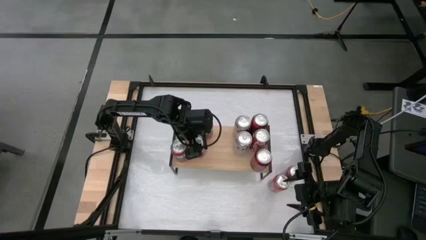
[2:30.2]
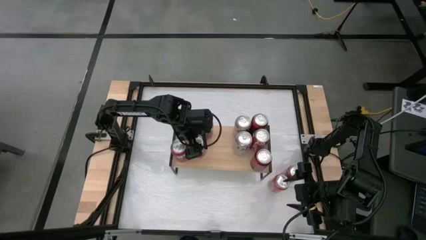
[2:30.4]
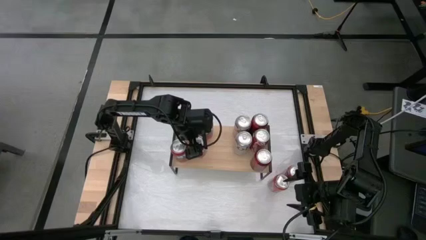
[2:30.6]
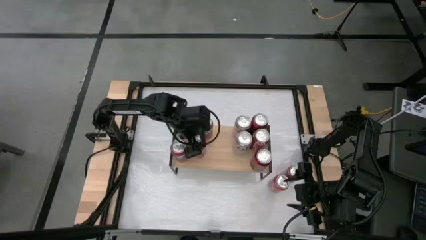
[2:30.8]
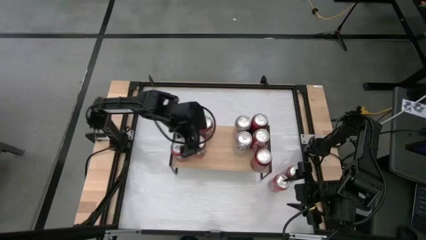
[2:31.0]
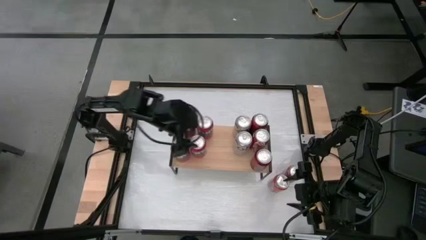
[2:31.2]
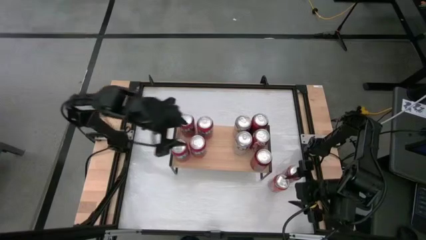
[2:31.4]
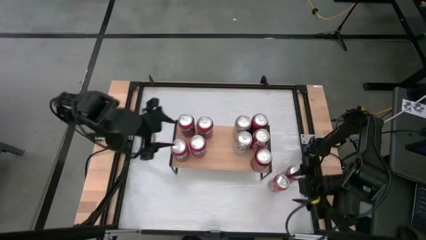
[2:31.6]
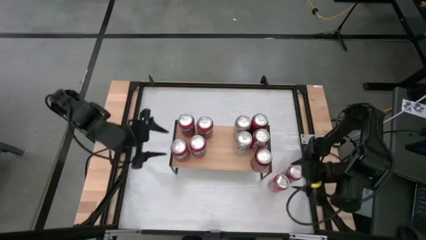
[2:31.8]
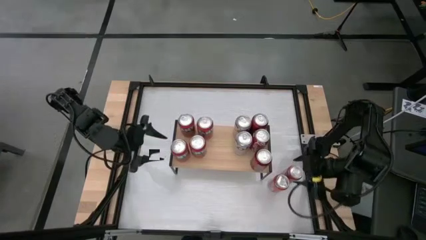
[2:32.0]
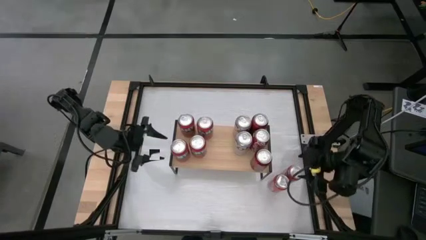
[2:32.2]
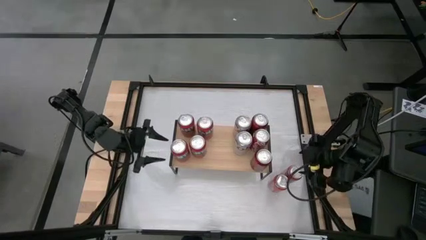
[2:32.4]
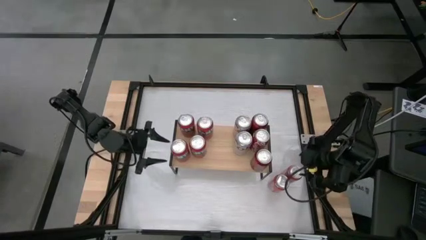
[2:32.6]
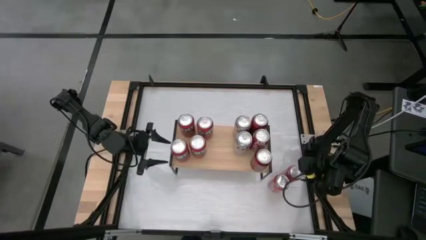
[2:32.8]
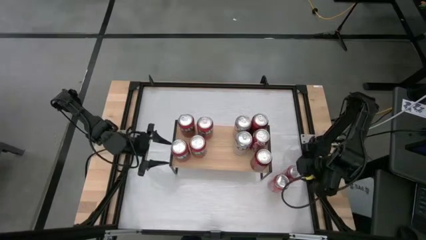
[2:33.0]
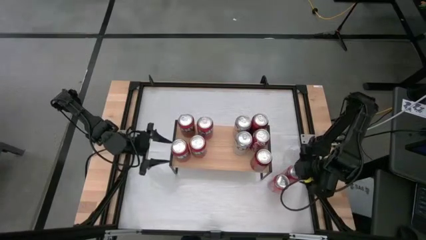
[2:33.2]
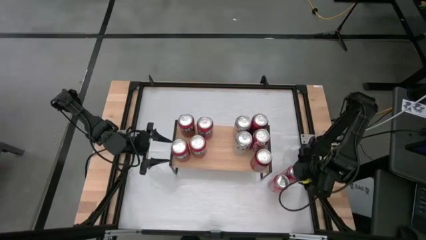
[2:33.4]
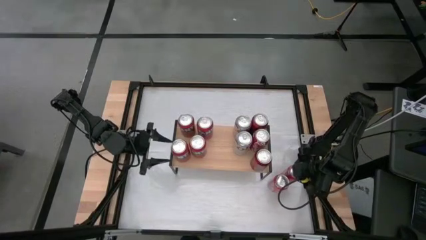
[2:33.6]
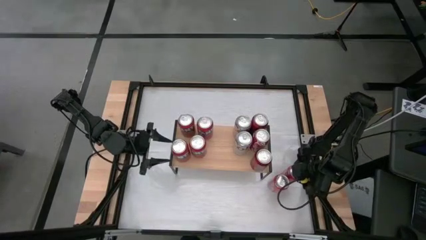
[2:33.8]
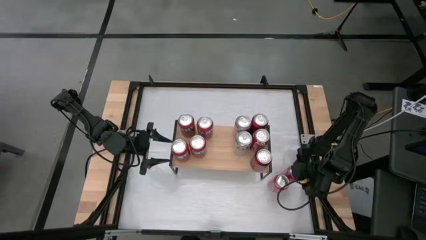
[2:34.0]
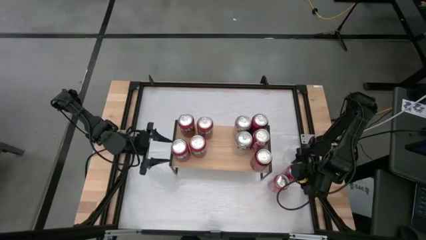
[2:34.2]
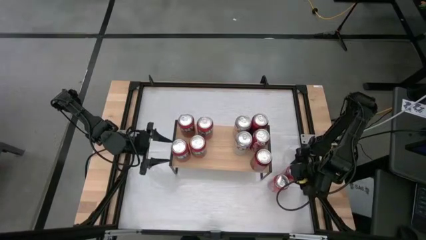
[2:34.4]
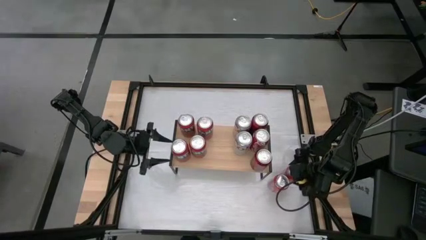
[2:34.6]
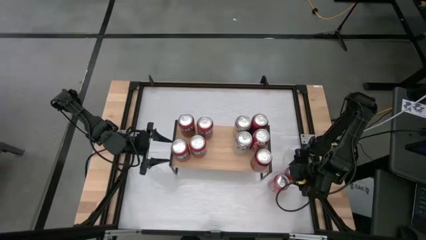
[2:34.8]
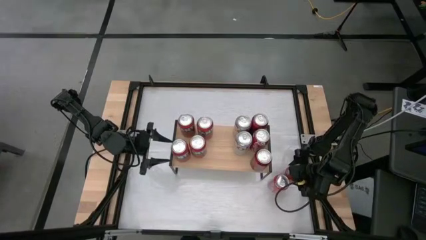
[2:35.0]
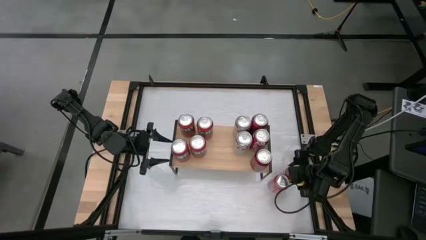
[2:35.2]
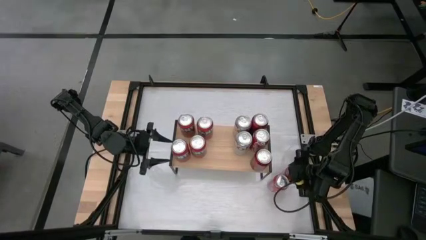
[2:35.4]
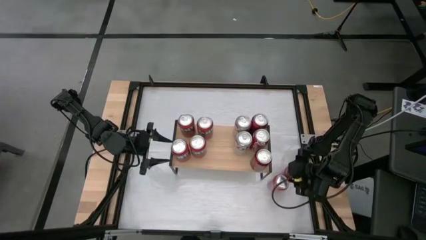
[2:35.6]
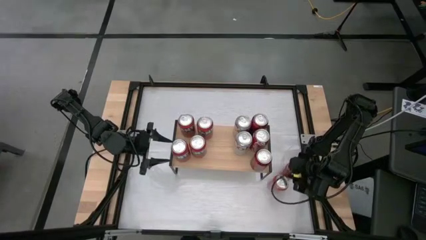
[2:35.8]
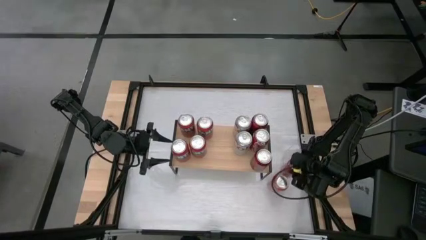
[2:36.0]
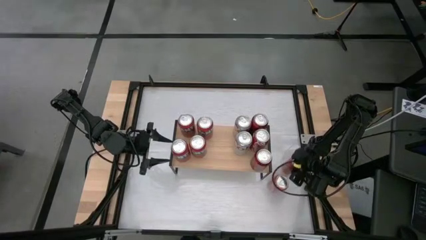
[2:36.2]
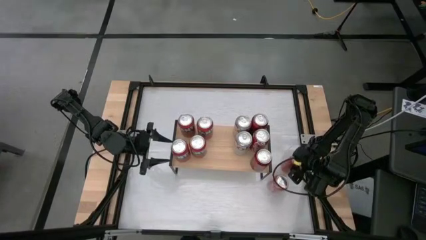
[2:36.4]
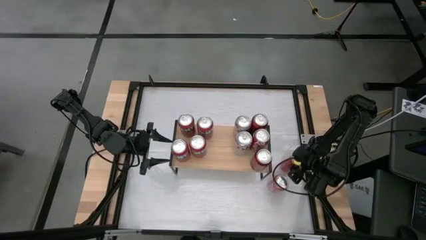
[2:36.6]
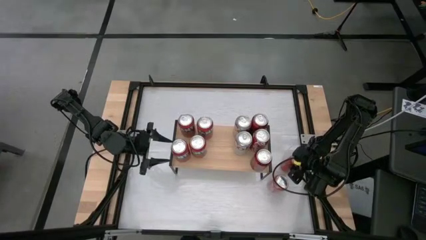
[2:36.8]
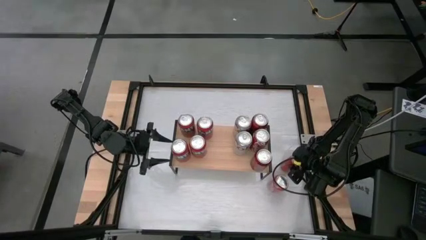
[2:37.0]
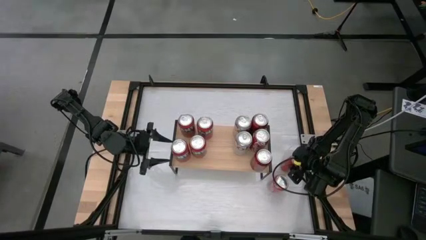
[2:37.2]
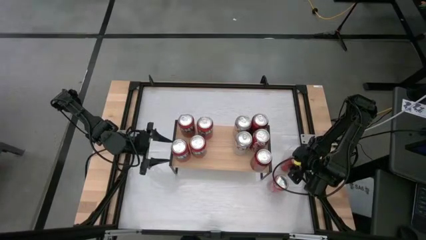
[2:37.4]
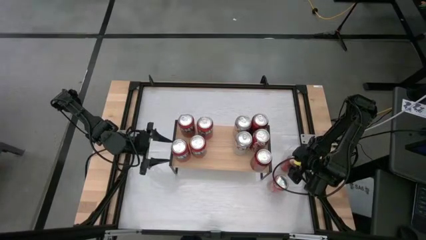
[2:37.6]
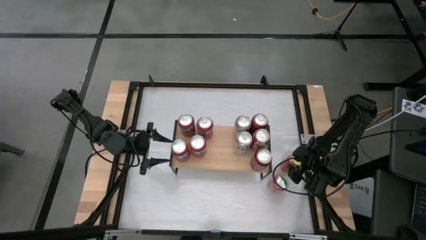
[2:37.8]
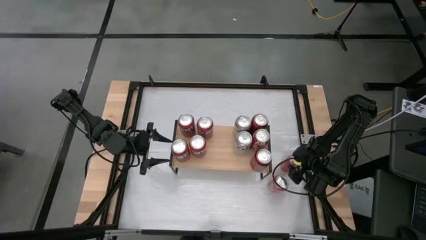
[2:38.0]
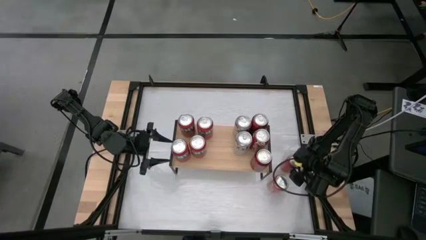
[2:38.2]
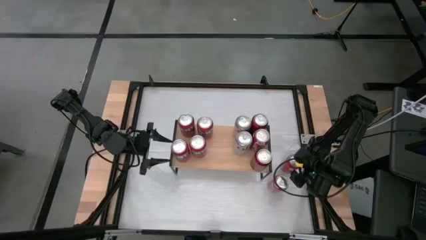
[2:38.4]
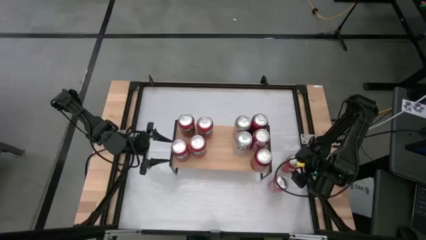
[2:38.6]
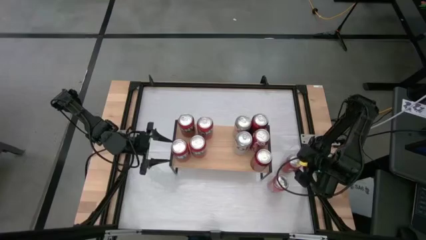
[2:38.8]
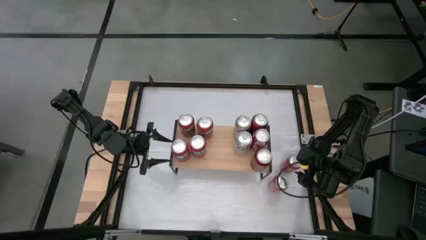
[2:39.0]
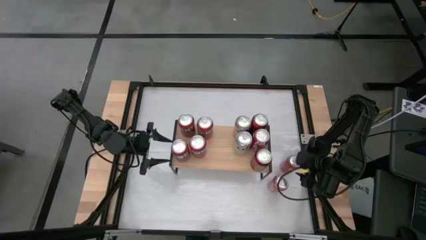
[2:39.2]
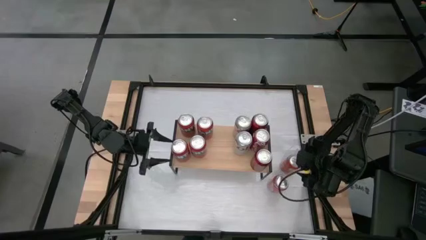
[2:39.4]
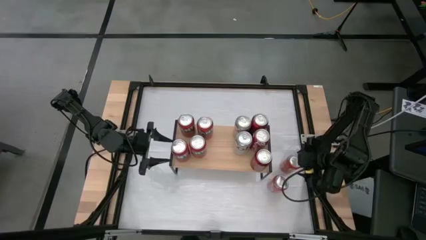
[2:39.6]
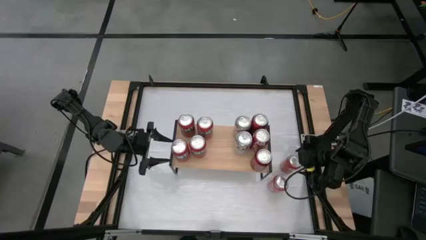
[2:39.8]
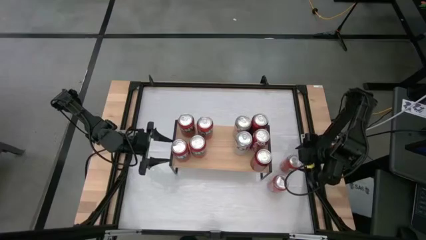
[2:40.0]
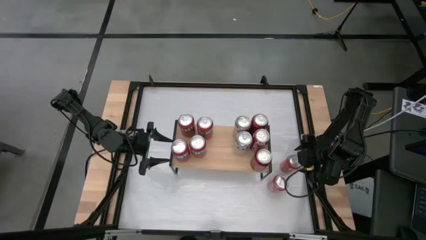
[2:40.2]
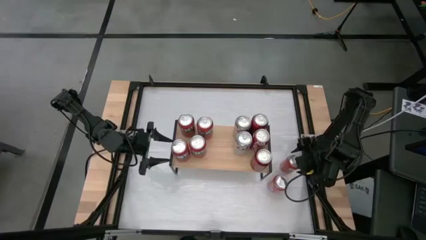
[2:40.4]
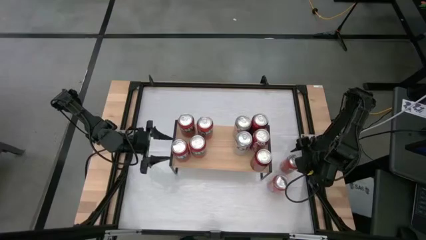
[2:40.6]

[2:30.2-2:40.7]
Task: Place canned beverage on shelf
Put the red soda can on the shelf

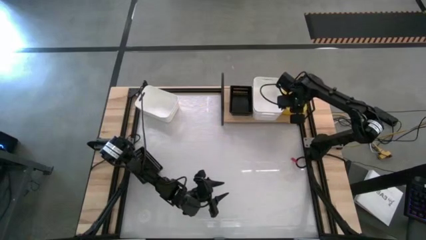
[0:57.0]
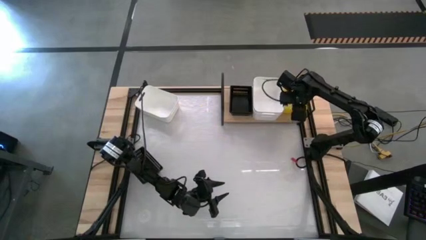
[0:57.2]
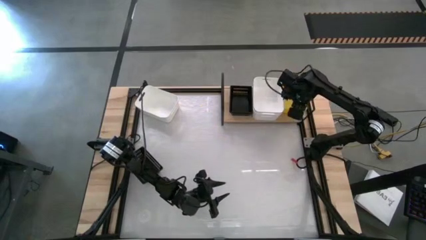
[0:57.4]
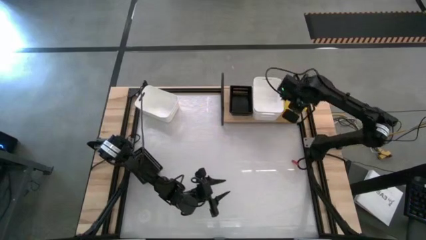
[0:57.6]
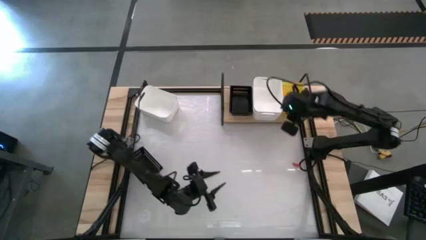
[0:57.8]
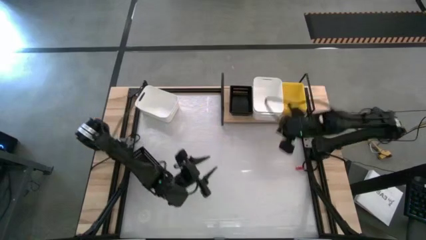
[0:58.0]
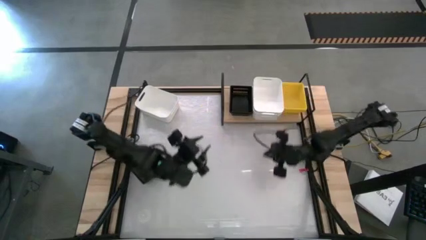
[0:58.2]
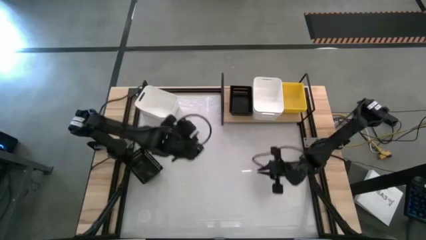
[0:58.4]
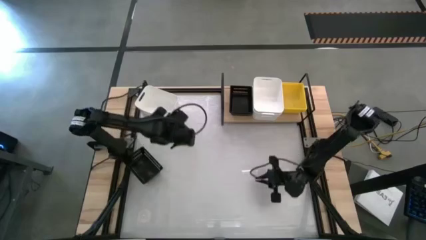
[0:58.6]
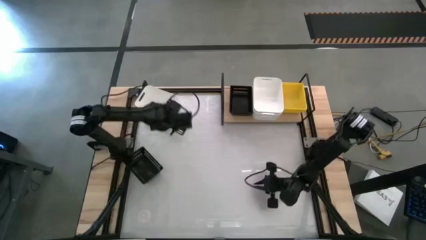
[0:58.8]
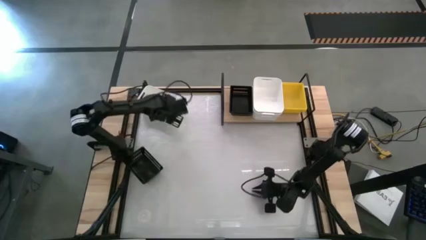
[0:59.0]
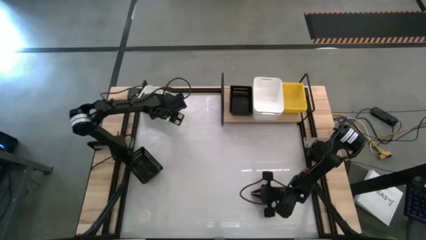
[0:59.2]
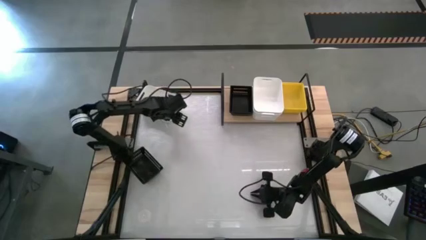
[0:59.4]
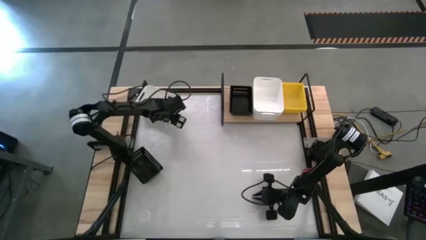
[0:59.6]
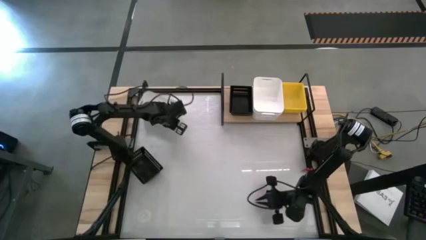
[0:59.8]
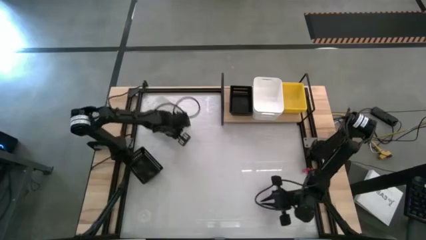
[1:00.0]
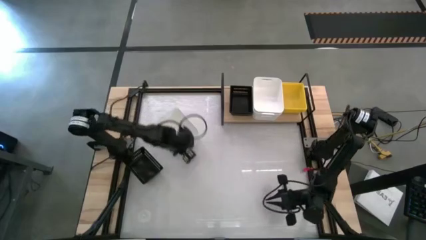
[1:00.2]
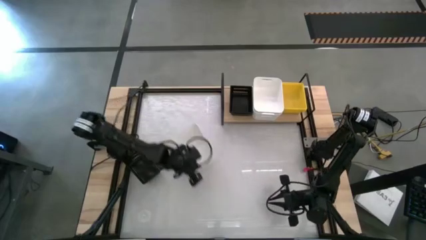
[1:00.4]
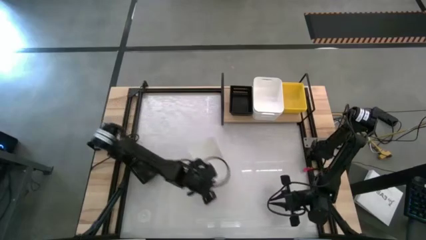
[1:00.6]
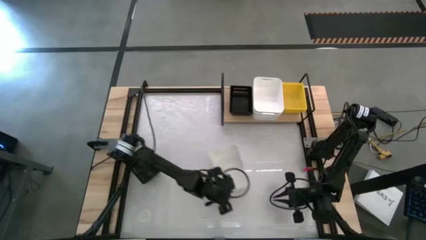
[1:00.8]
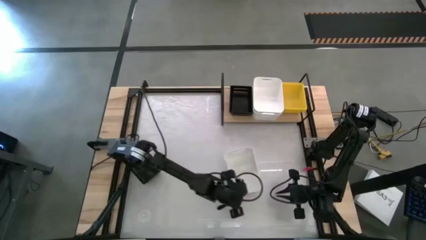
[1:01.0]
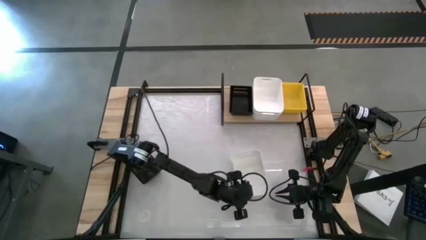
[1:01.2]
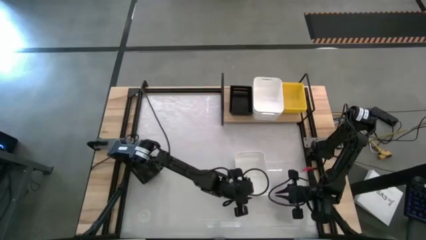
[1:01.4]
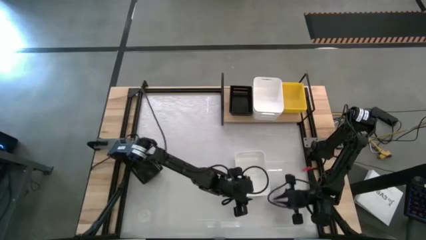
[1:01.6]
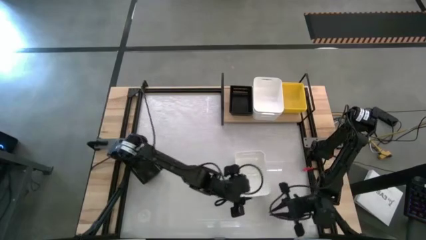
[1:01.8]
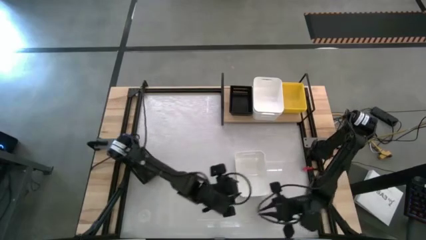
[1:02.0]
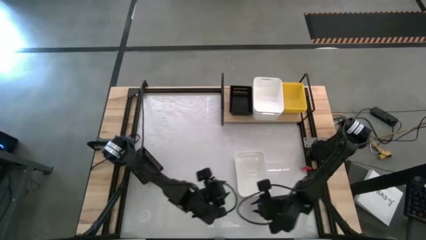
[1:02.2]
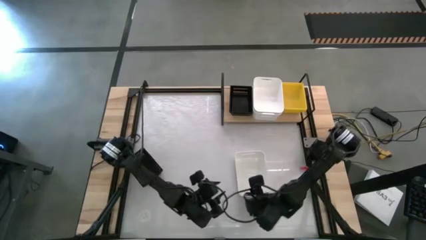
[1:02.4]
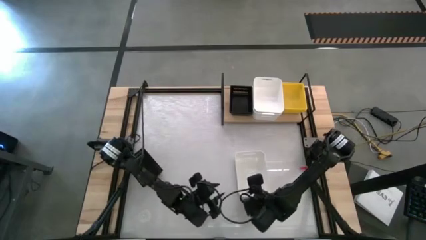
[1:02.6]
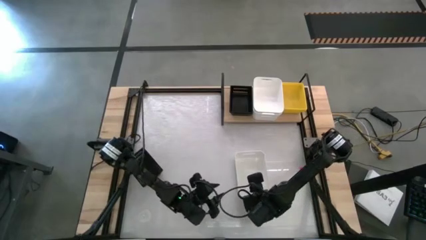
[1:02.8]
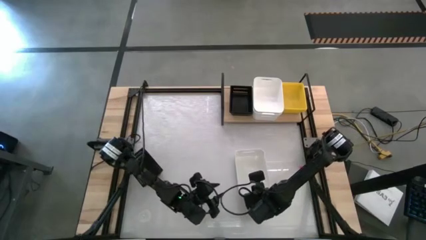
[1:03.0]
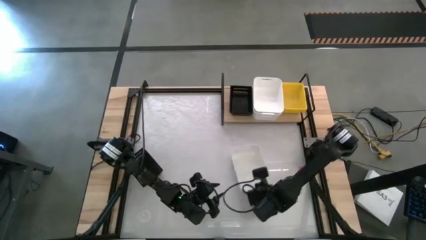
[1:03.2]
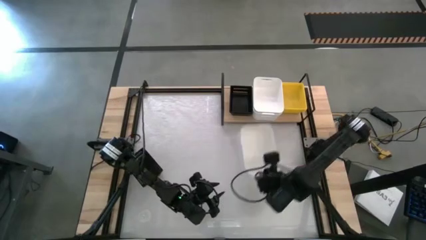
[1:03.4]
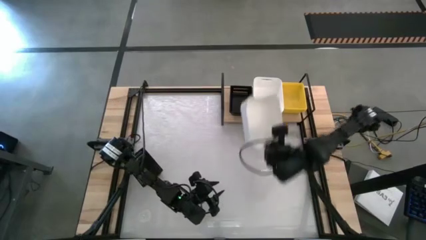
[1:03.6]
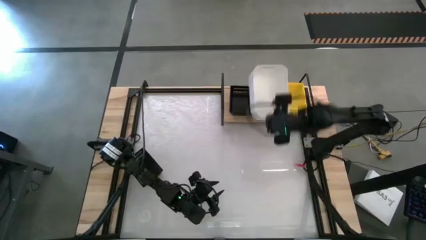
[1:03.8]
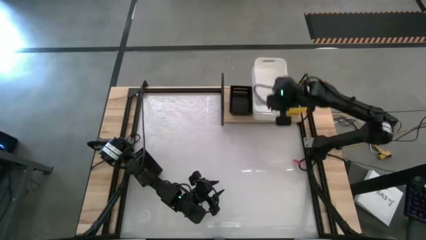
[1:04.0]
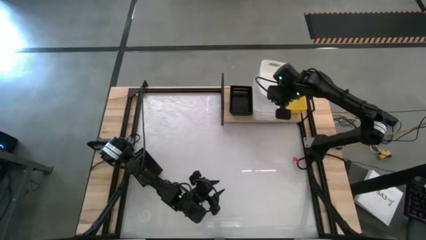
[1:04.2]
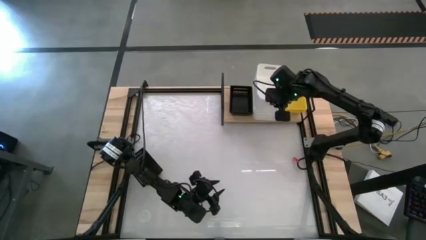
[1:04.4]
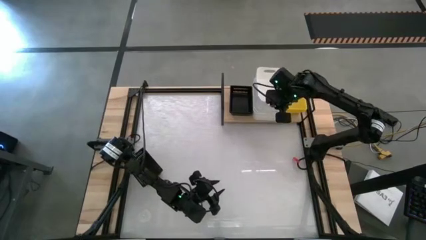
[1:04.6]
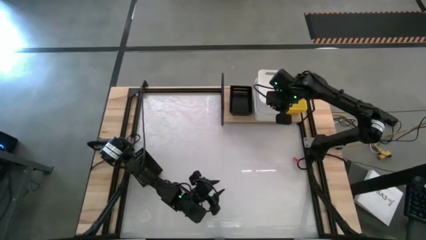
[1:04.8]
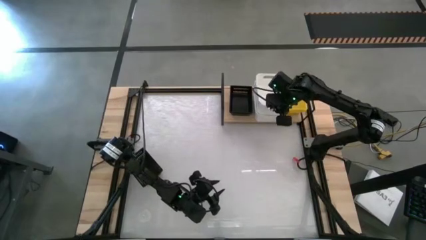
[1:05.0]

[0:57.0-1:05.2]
Task: Stack baskets on shelf by color
Stack the white bin into the white bin on the shelf
